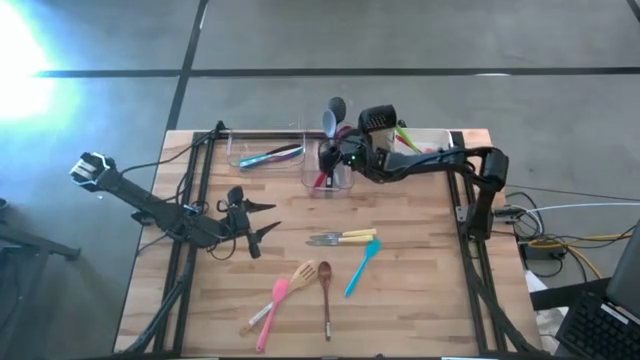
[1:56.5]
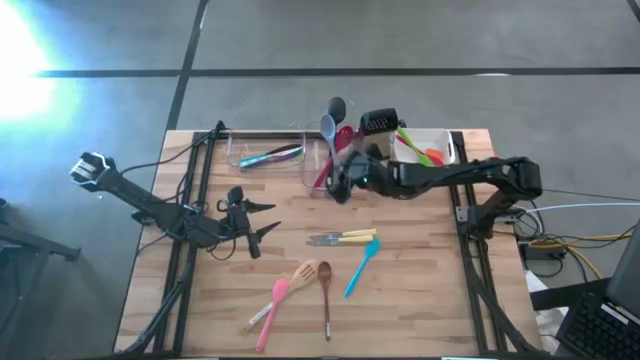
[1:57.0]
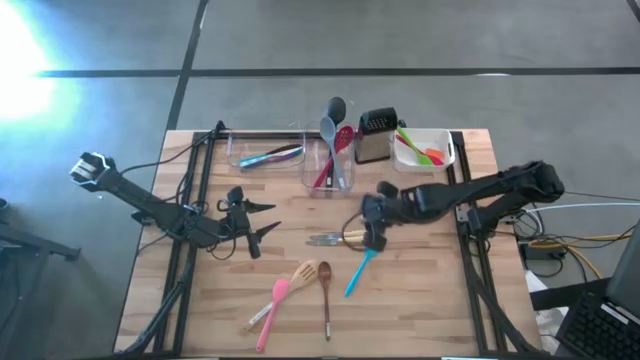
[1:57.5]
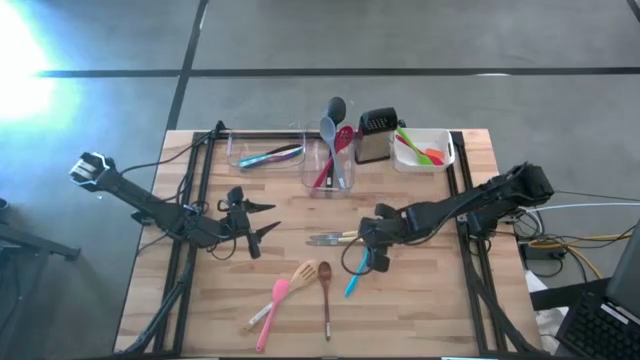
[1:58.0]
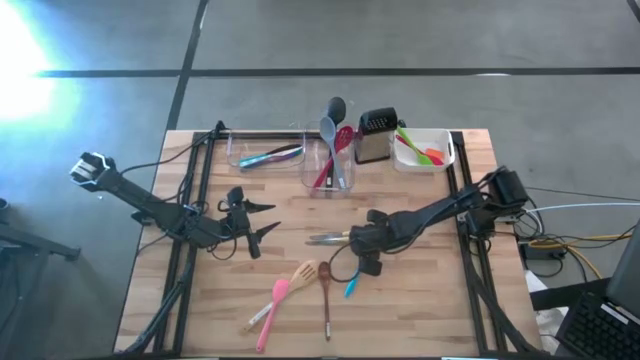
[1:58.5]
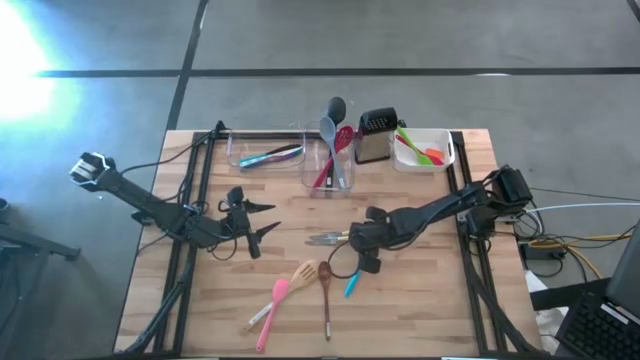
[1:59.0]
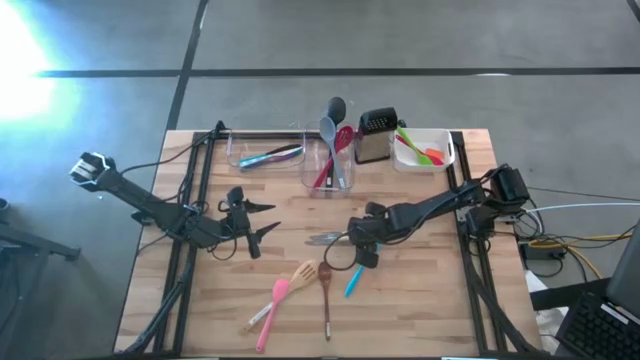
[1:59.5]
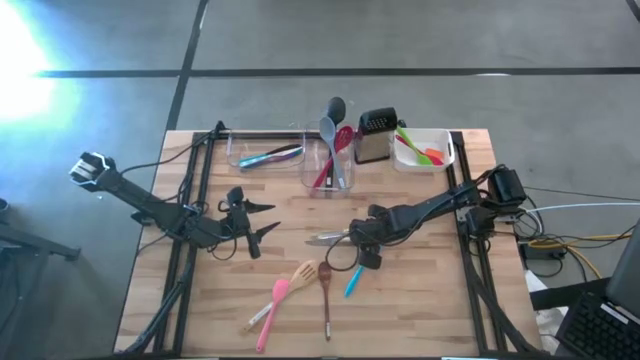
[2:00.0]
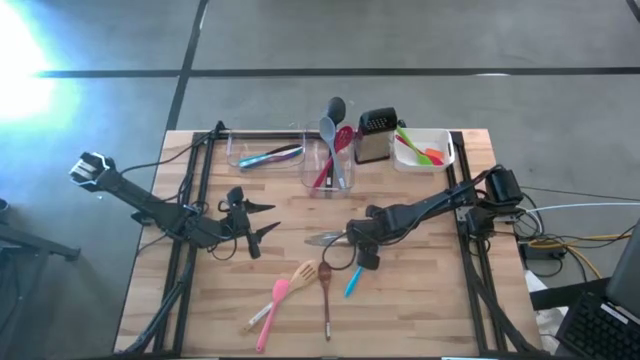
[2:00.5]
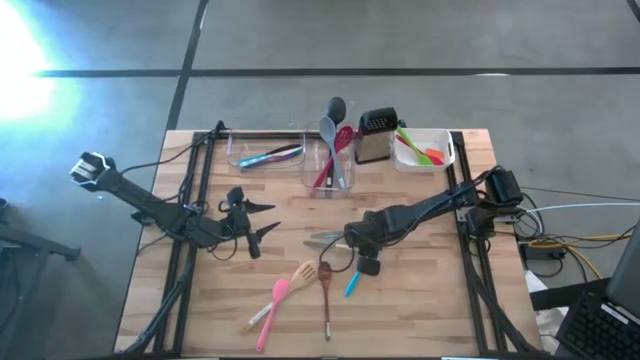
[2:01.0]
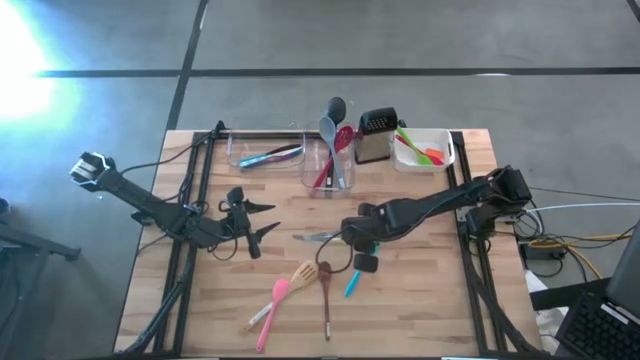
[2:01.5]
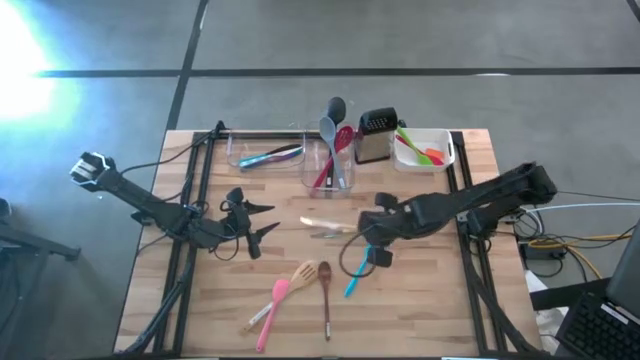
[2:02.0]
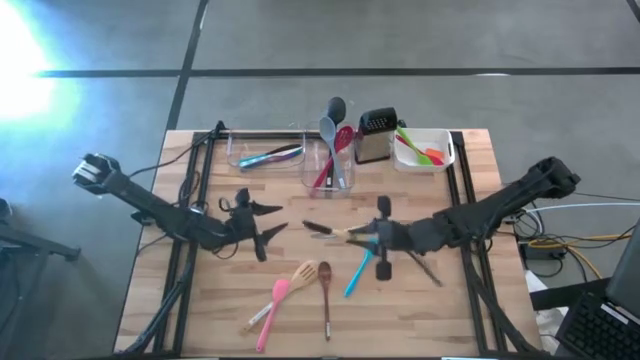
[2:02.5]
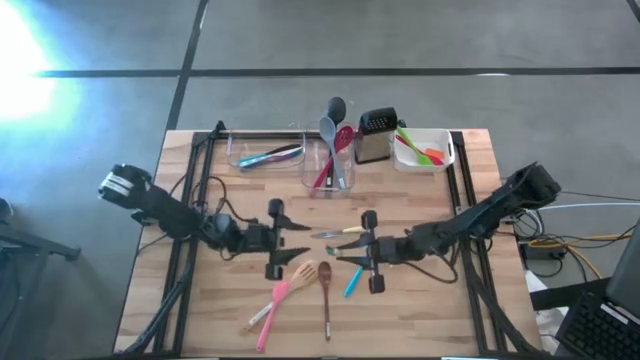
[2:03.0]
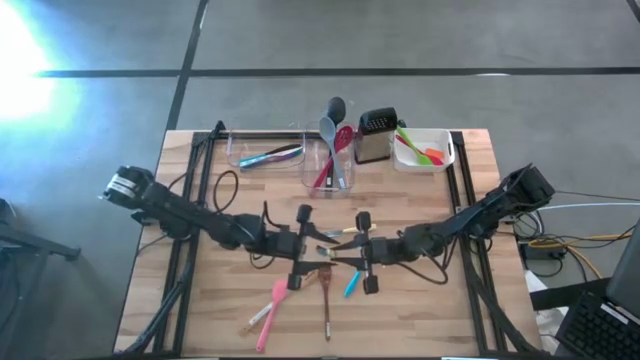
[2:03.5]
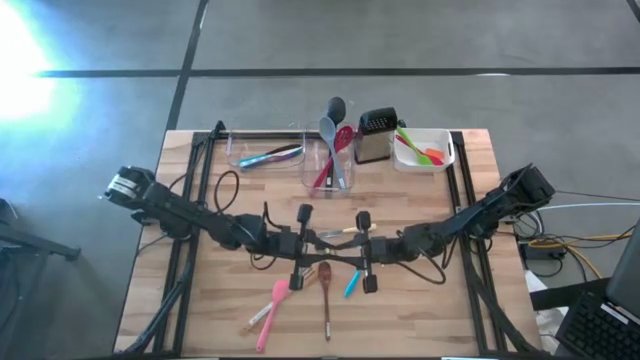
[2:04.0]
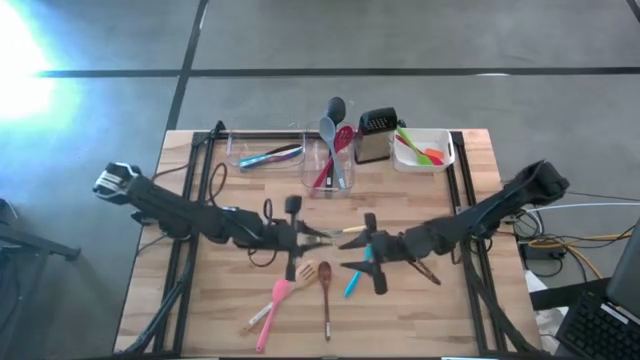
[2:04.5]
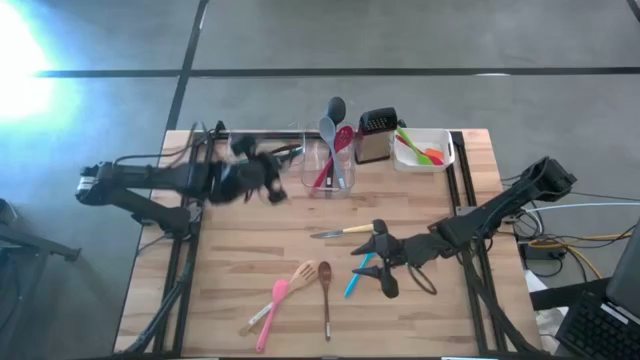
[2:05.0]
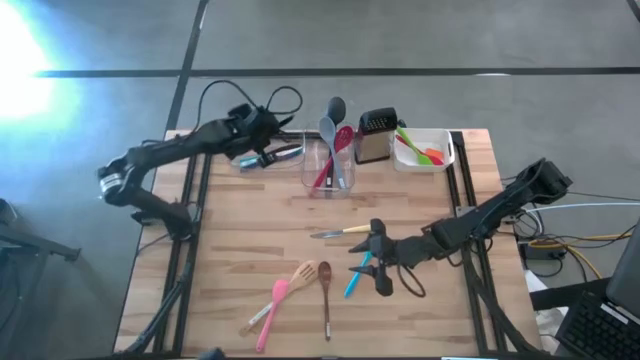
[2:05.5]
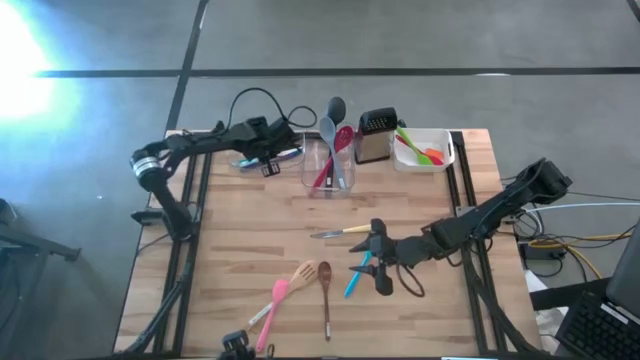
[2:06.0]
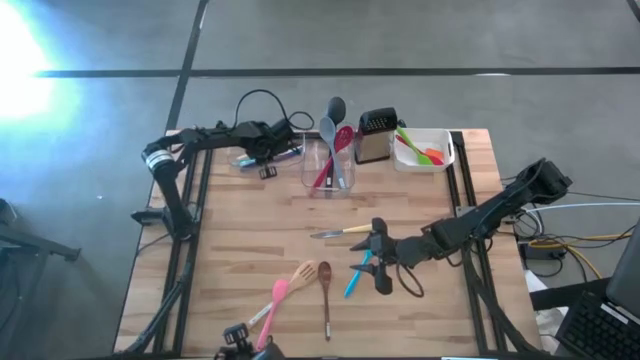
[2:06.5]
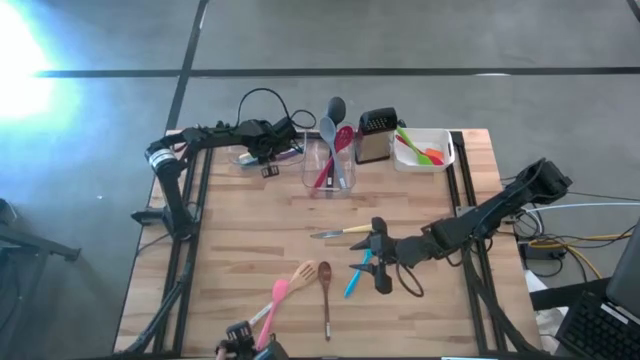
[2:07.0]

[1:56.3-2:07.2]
Task: Pick & Place Kitchen Items
Put the bottom yellow knife into the left transparent bin

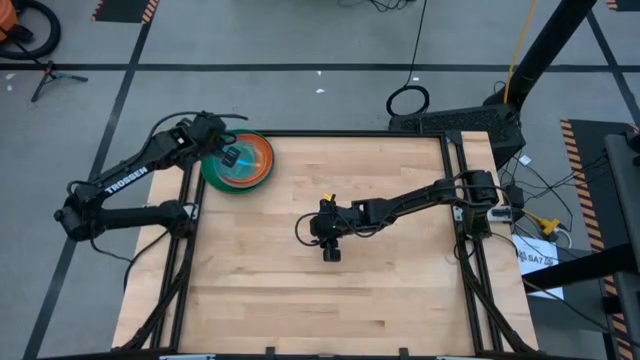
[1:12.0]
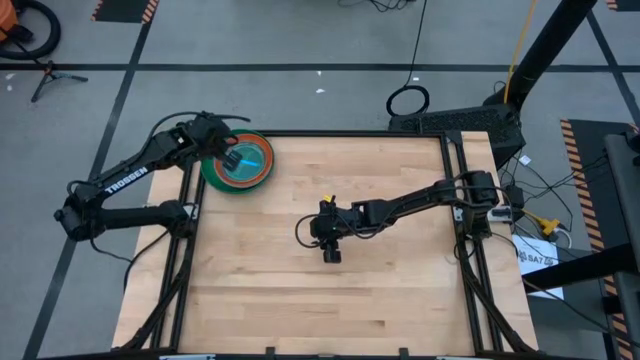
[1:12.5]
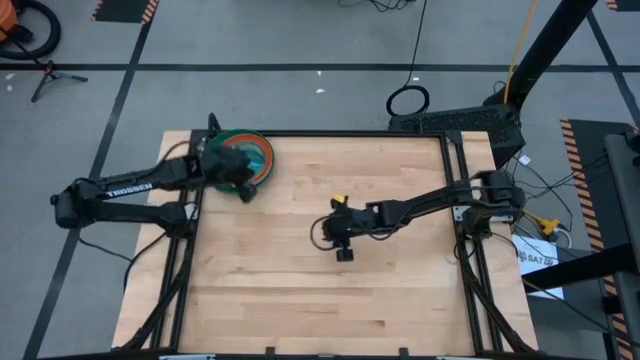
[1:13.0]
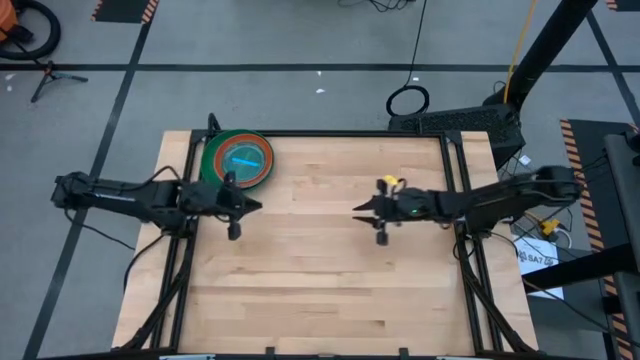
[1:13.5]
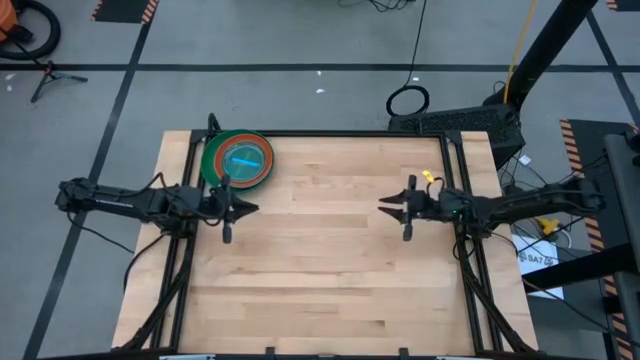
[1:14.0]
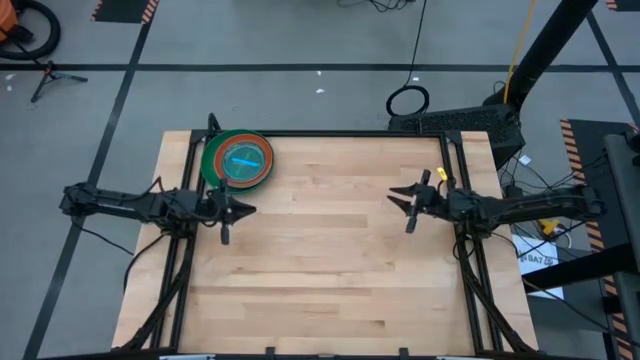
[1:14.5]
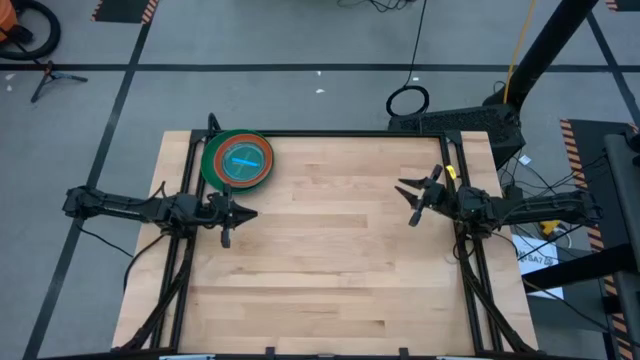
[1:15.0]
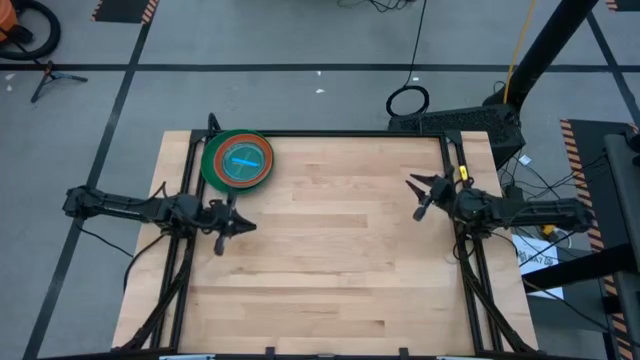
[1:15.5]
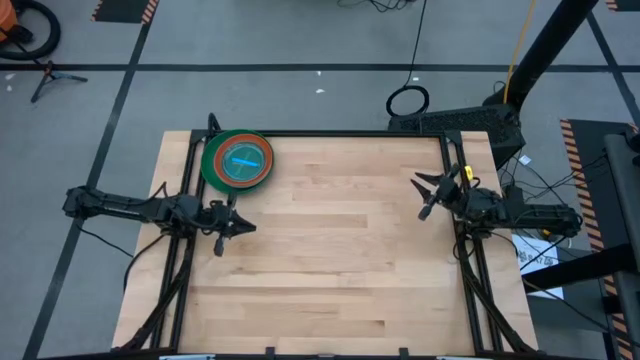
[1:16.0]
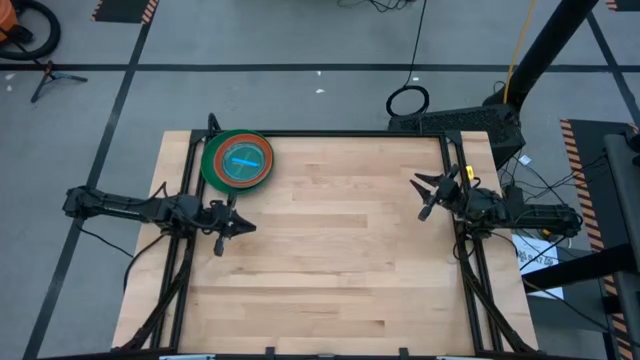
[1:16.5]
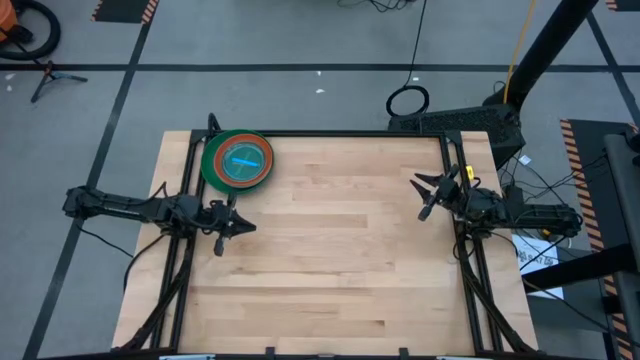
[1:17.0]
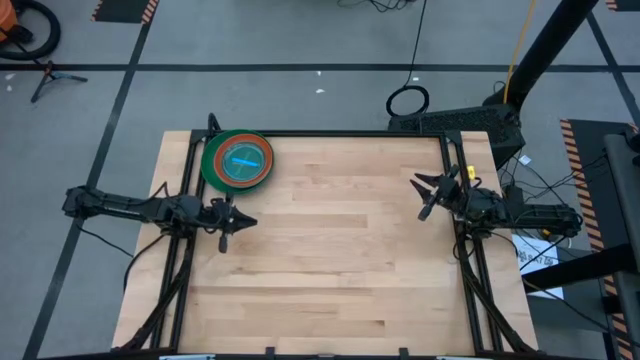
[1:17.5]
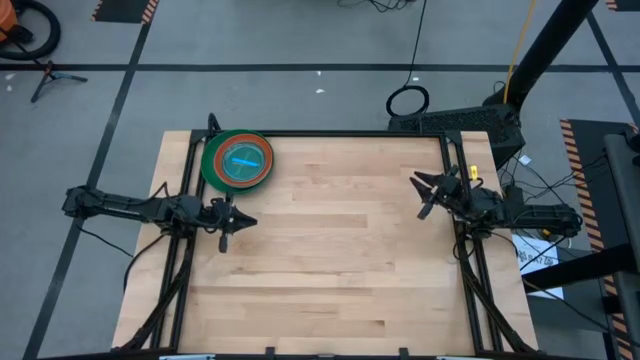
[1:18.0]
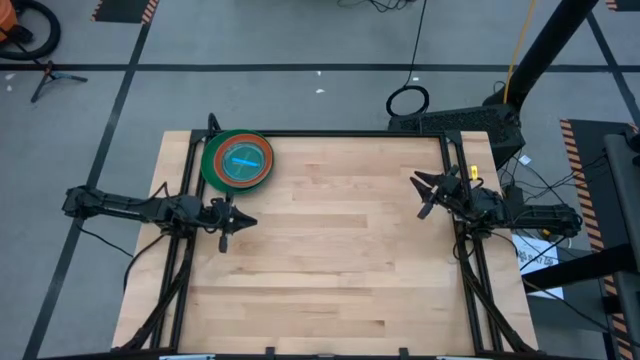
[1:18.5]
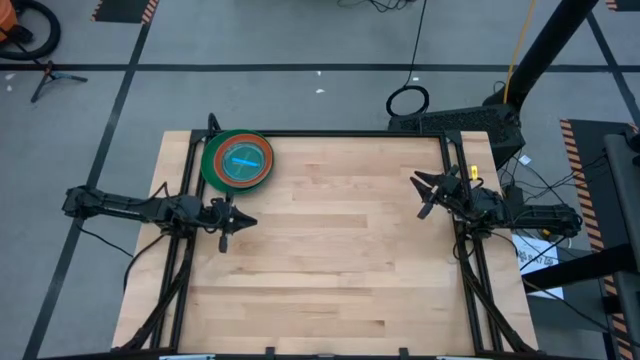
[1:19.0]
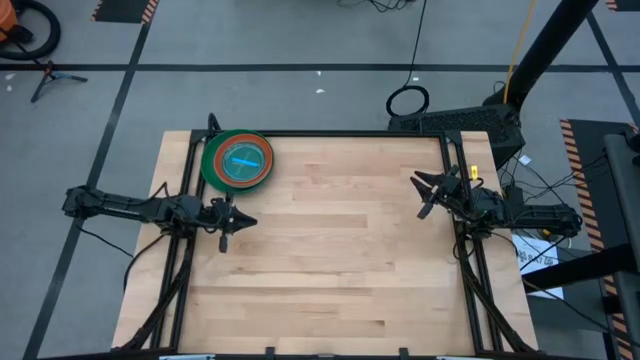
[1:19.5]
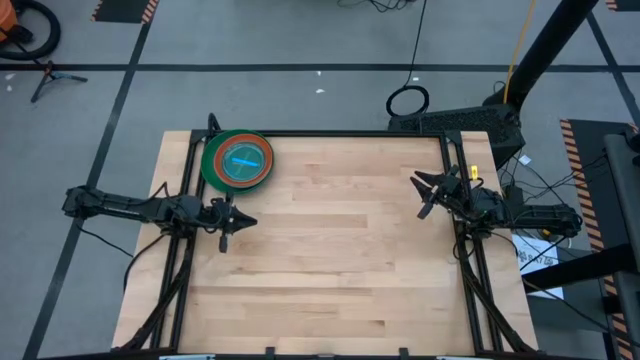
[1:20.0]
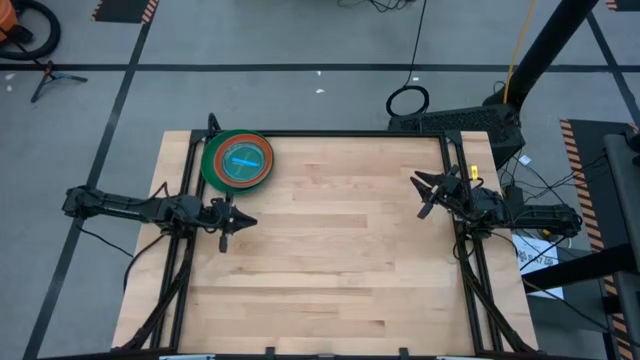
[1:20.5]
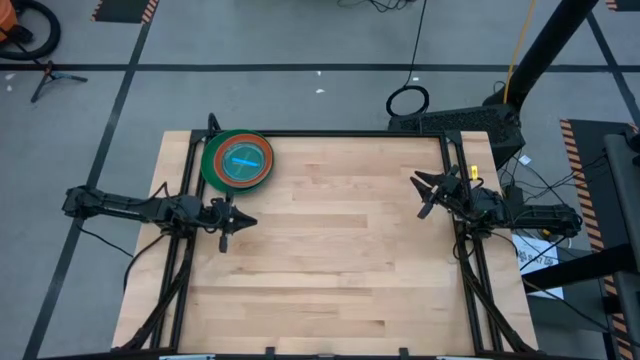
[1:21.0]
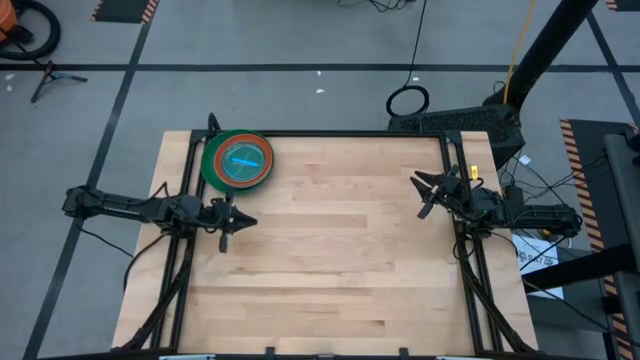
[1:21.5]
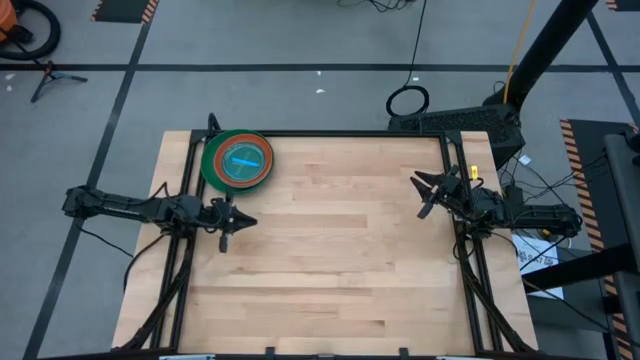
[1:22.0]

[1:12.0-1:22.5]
Task: Stack plastic plates
Return to Home Position
